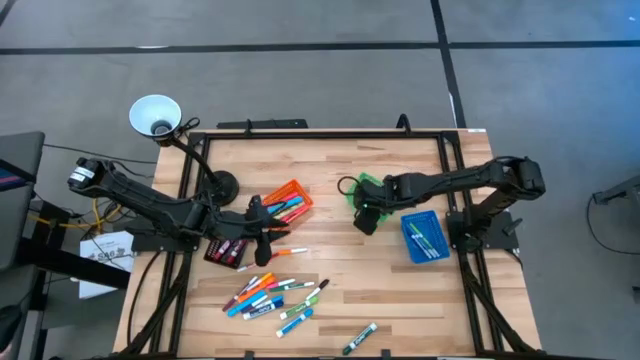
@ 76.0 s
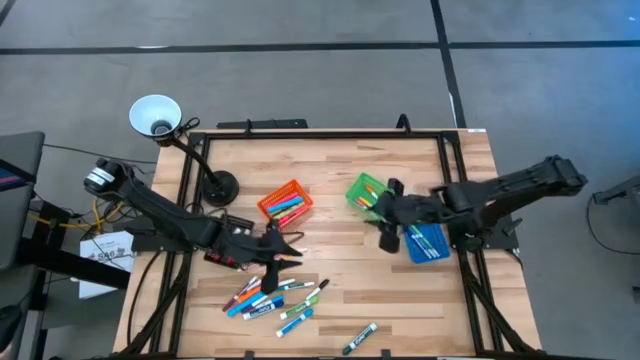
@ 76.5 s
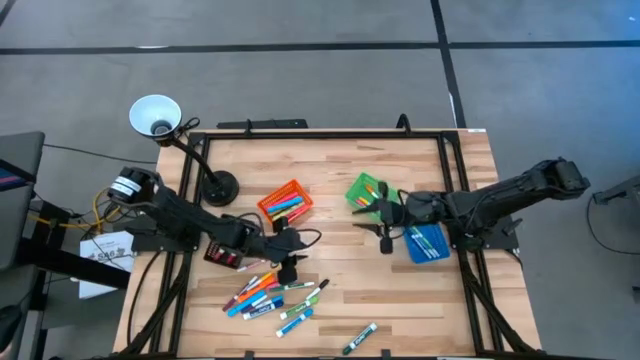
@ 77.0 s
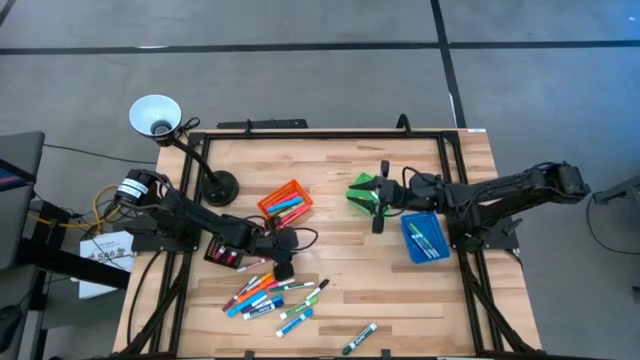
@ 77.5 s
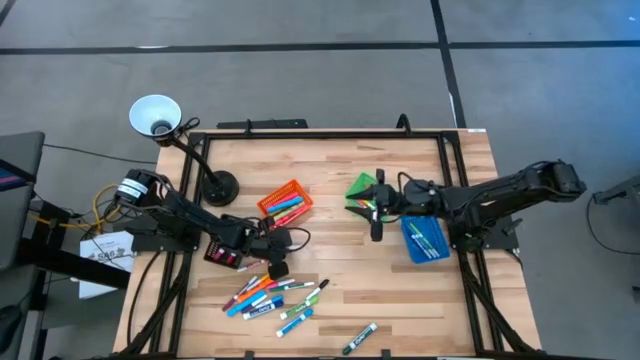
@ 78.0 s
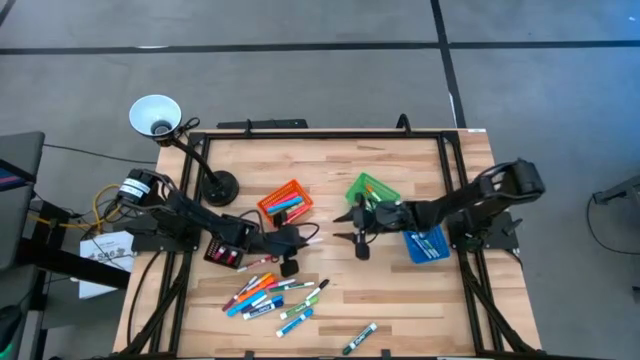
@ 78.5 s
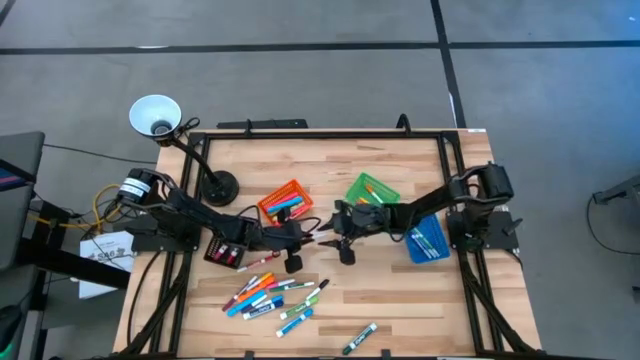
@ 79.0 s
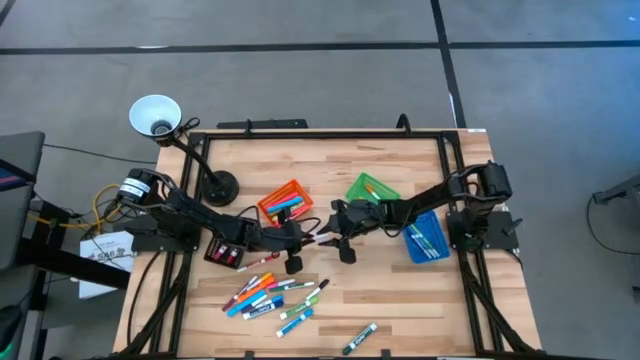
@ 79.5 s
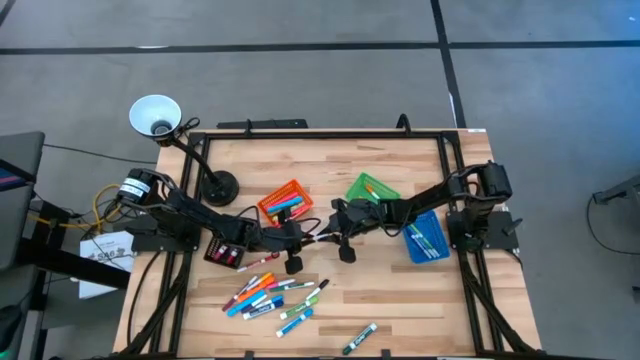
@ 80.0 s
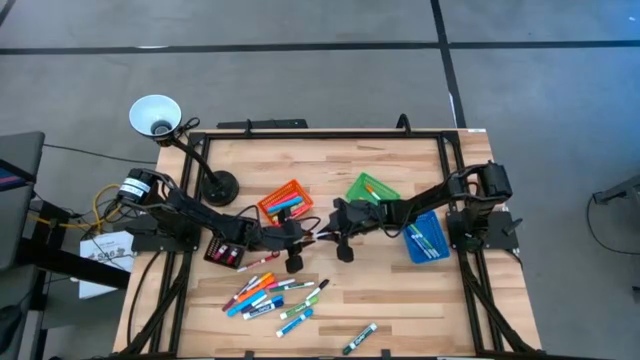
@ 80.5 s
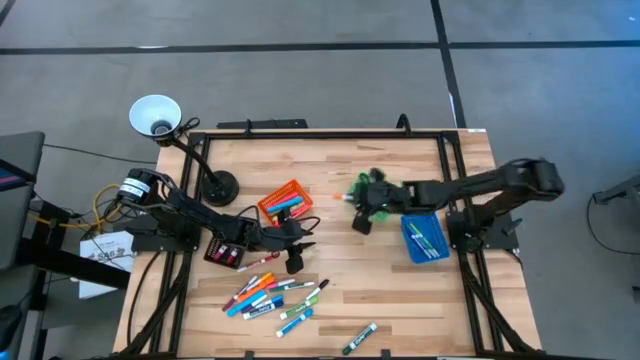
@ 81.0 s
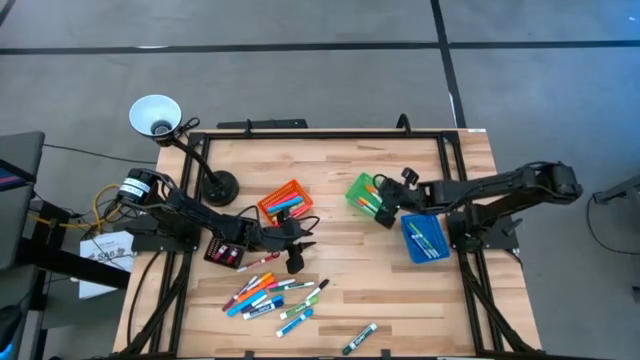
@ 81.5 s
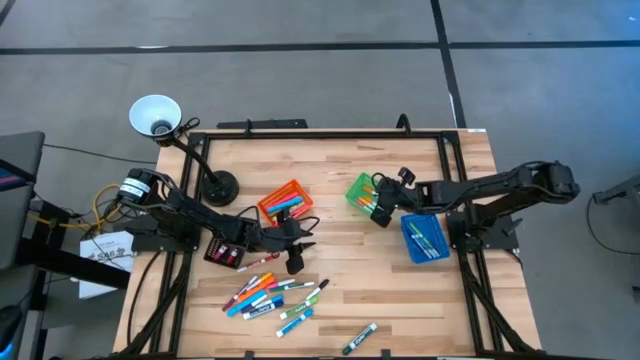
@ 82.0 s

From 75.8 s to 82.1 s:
Task: Pick & Place Markers
Put the orange pen into the green bin

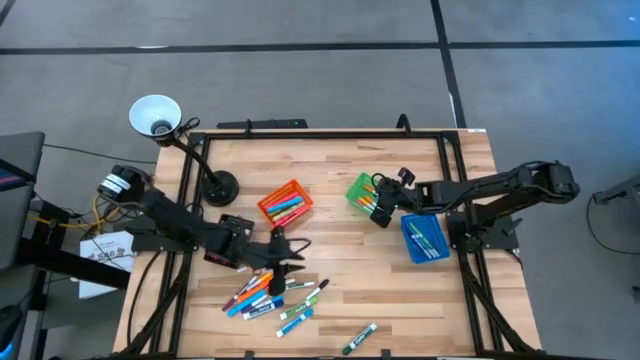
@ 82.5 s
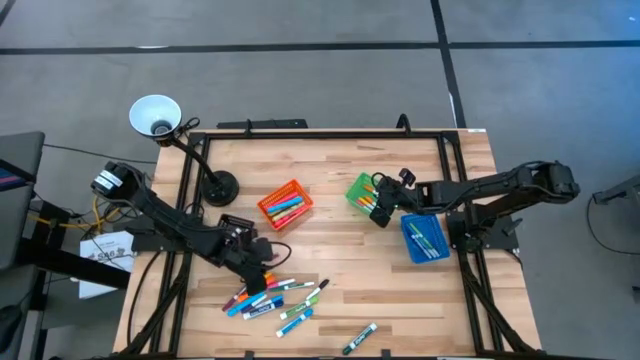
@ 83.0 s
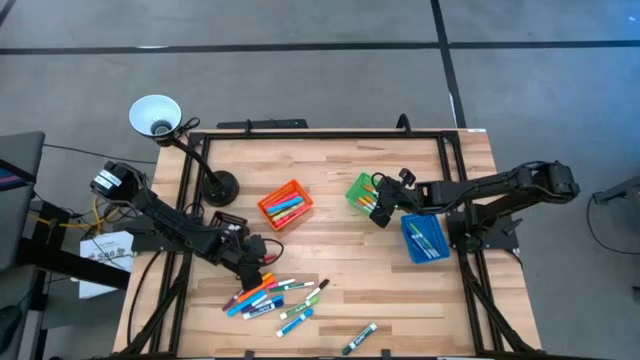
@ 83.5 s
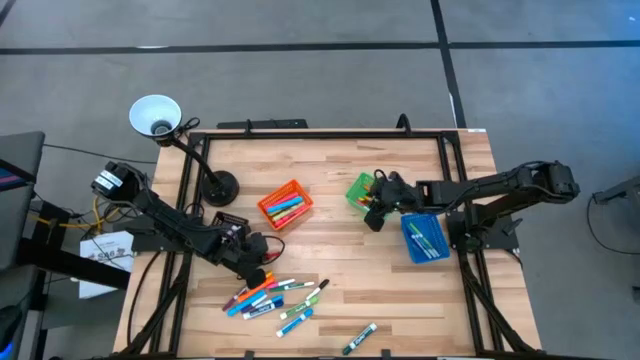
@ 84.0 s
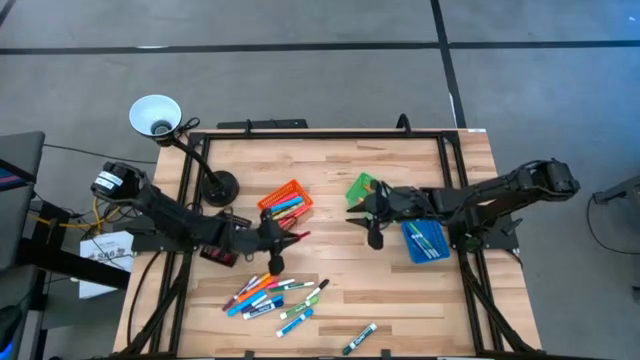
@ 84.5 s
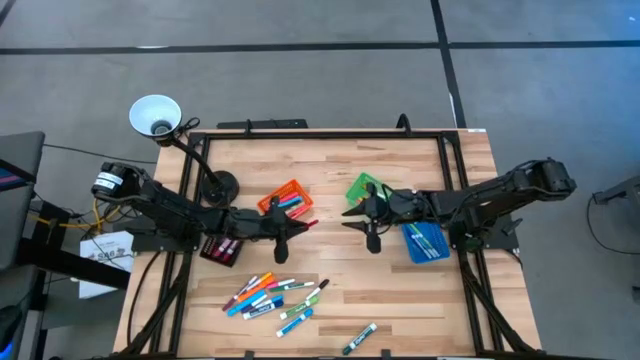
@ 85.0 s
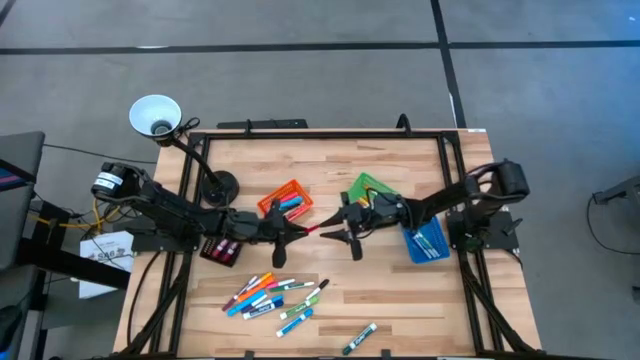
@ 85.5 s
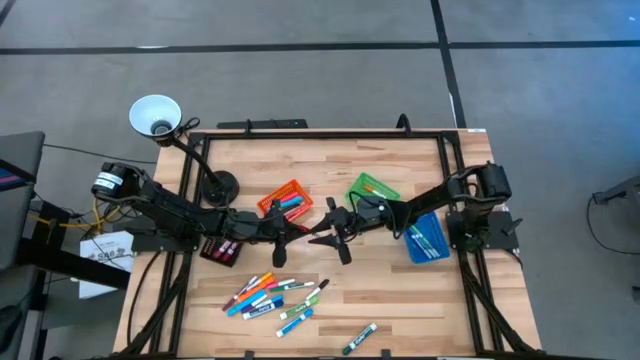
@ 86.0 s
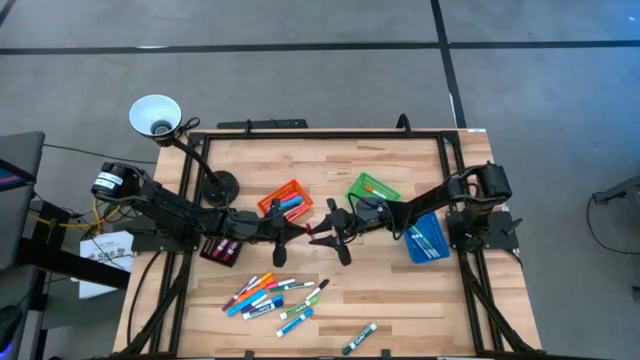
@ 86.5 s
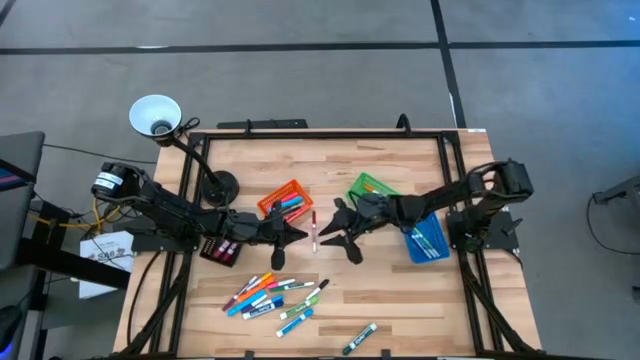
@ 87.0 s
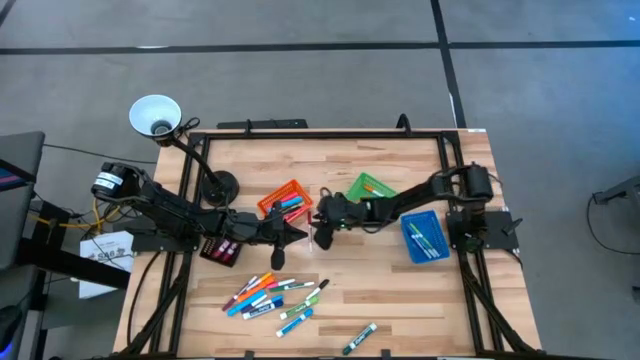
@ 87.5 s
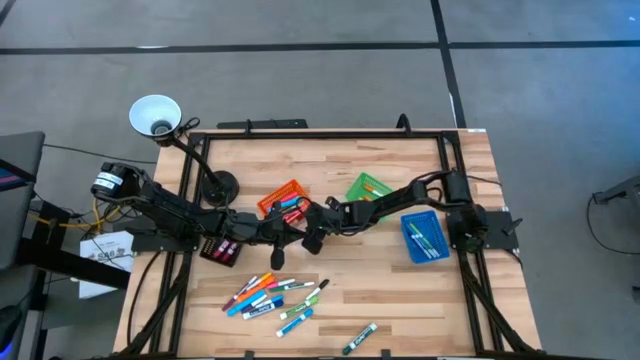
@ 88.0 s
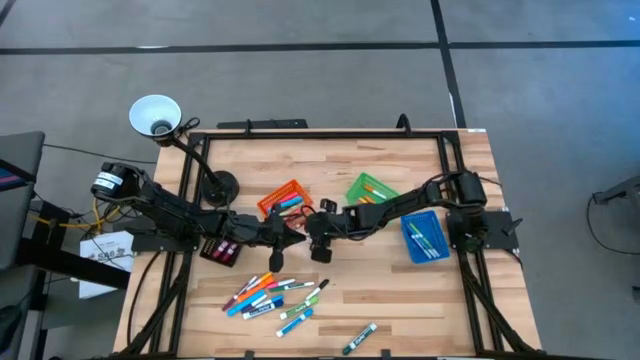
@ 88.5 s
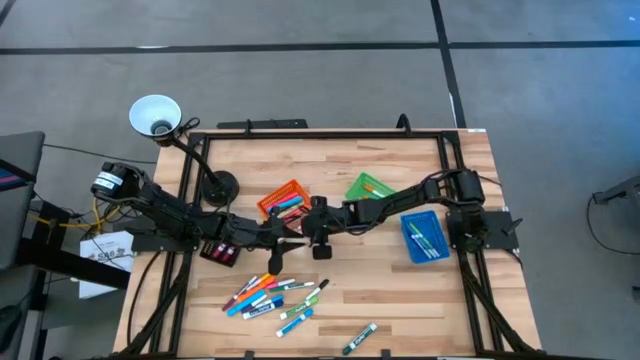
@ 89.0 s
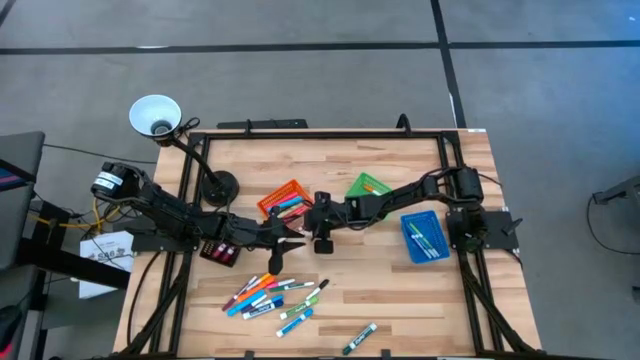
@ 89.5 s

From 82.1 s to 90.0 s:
Put the red marker pen into the blue bin

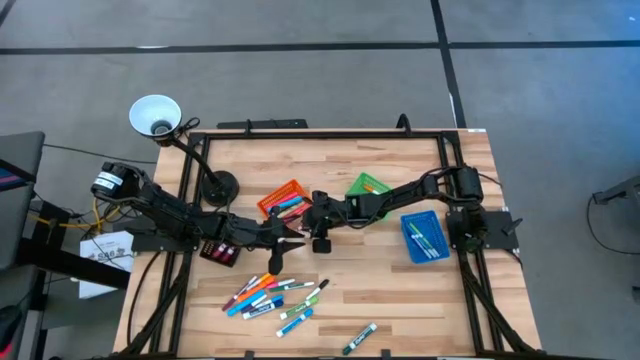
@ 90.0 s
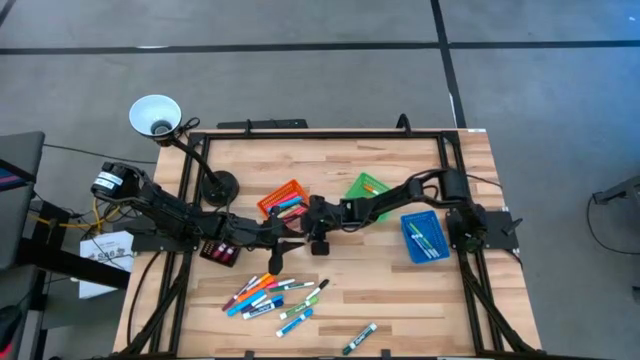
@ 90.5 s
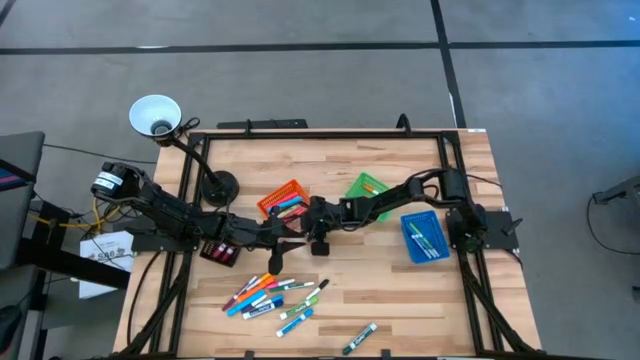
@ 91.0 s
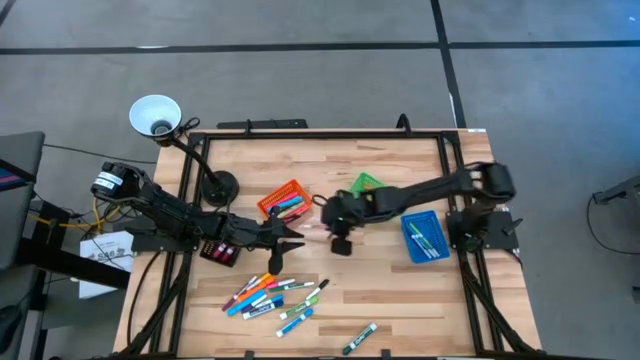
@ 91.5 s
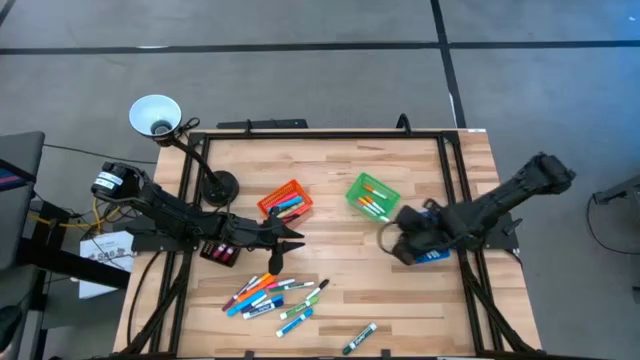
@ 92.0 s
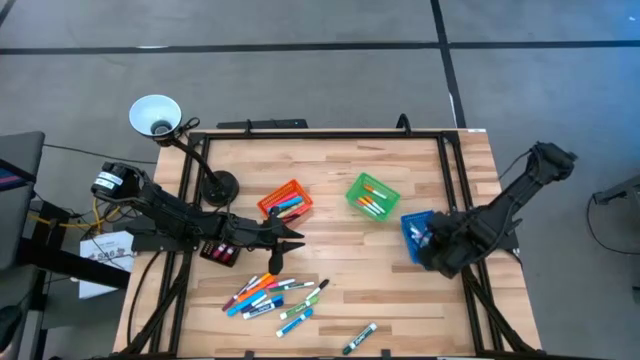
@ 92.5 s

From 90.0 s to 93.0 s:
Put the red marker pen into the blue bin

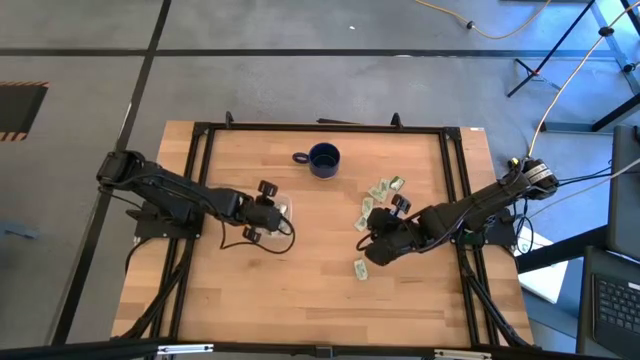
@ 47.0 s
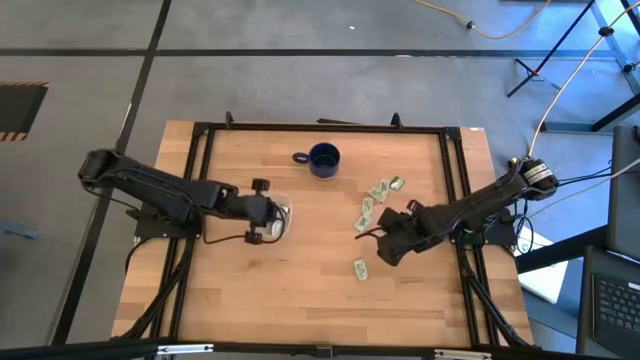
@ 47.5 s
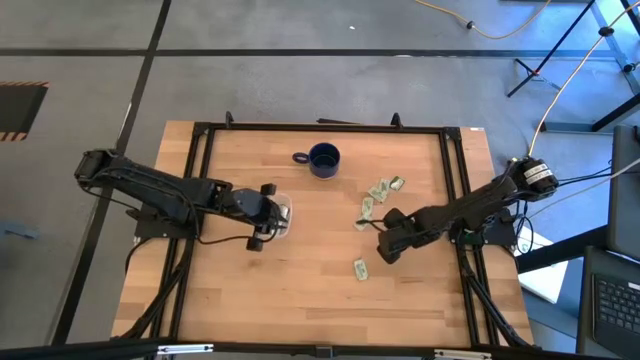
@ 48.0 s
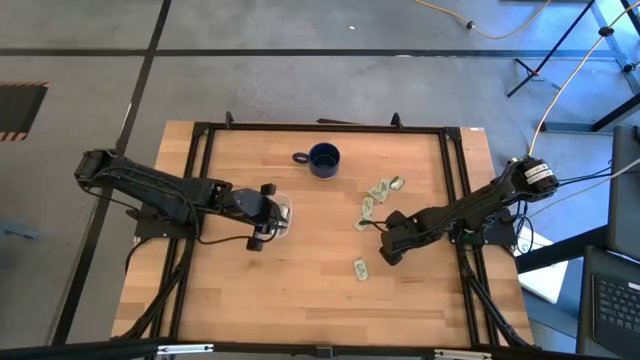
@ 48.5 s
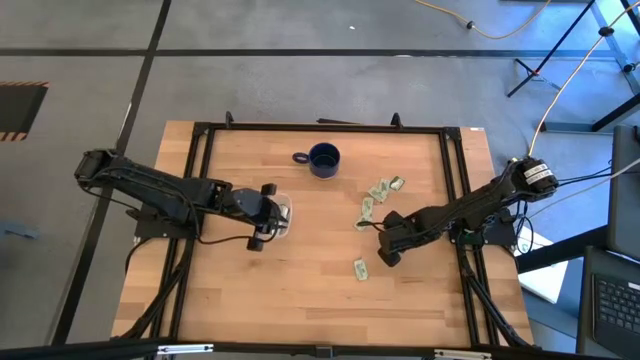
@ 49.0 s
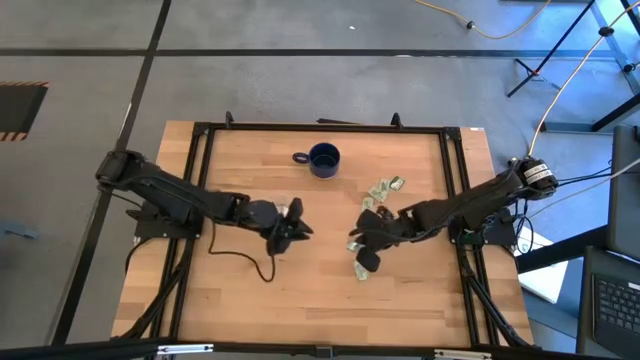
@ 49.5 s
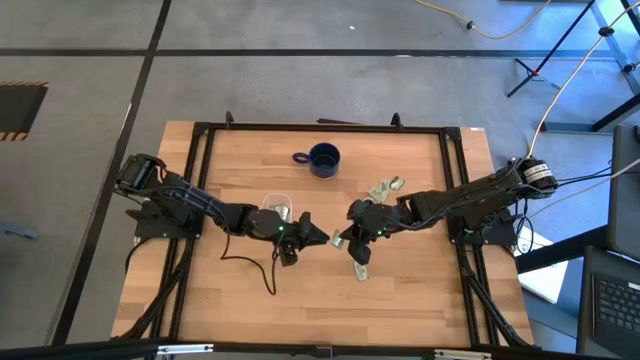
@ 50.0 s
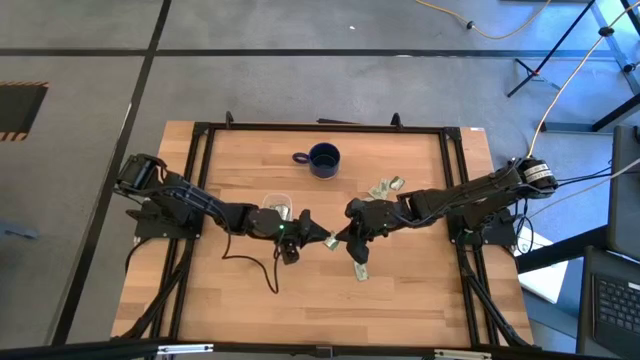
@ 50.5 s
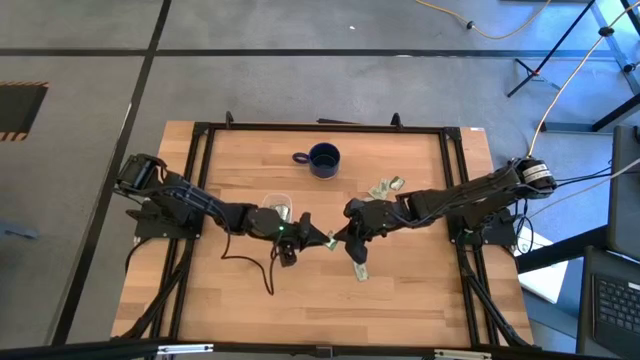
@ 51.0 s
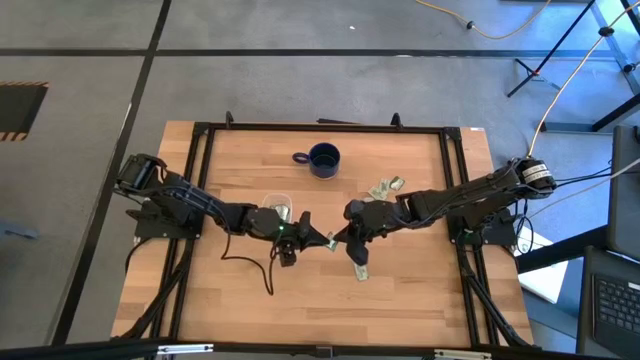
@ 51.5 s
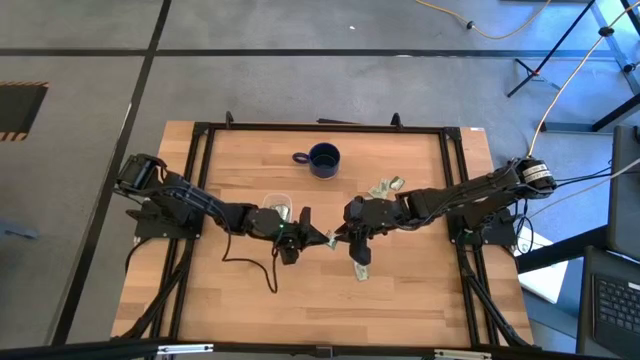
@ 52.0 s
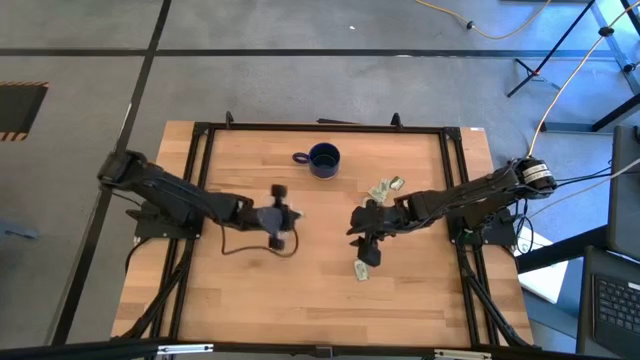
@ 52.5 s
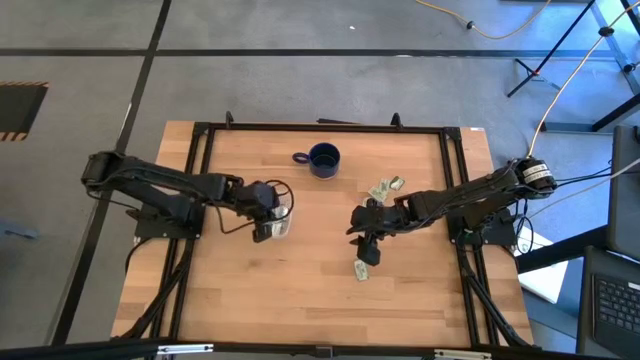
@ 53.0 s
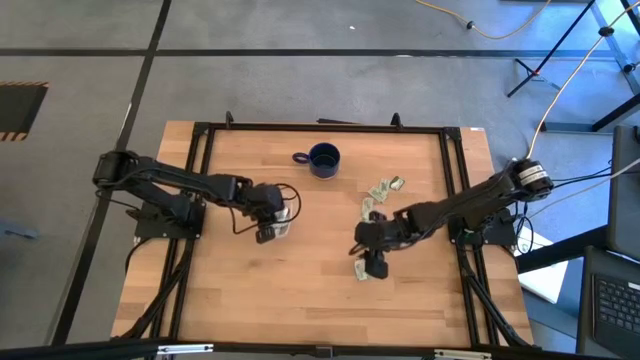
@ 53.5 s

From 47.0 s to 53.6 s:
Task: Pick and place Stevia / Truvia into bins
Put the bottom green stevia packet into the transparent container
